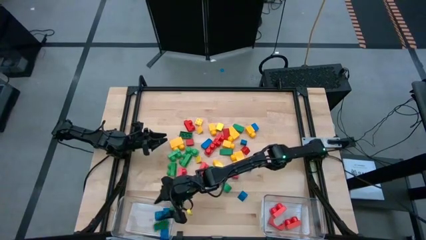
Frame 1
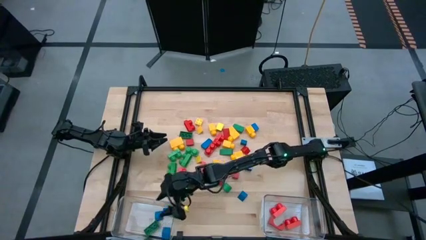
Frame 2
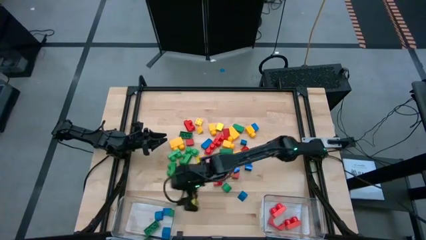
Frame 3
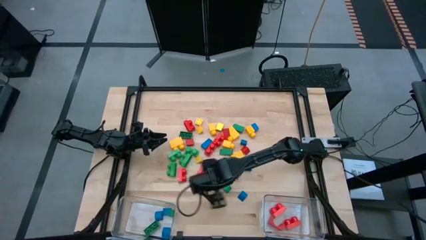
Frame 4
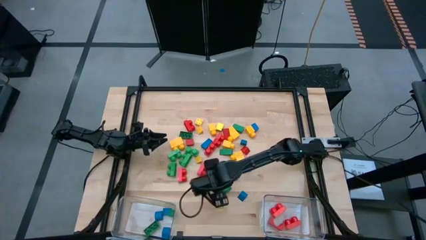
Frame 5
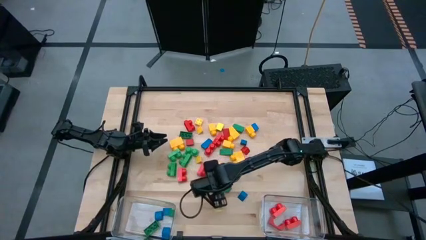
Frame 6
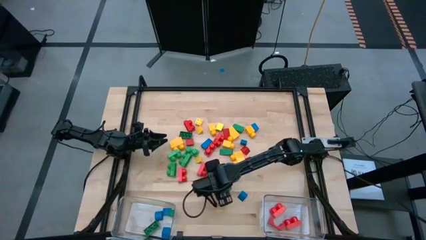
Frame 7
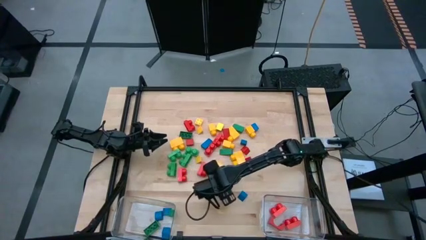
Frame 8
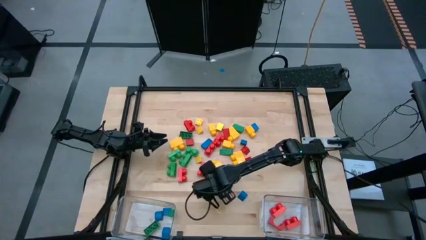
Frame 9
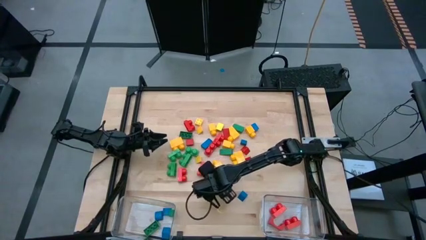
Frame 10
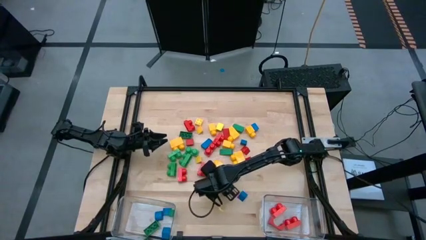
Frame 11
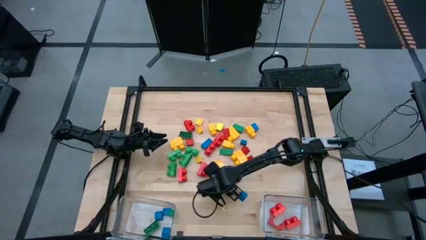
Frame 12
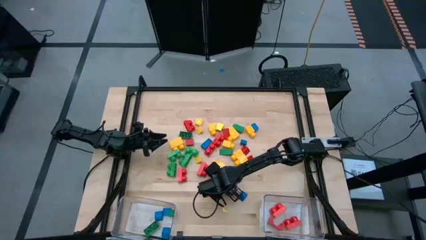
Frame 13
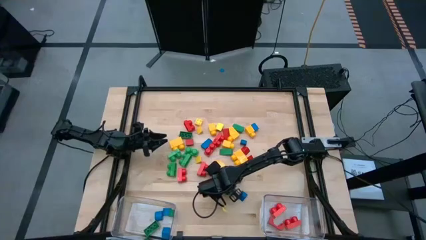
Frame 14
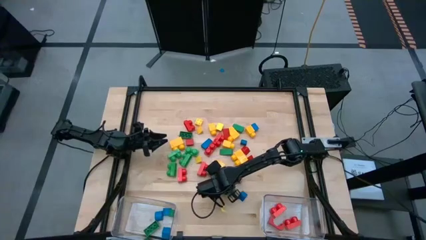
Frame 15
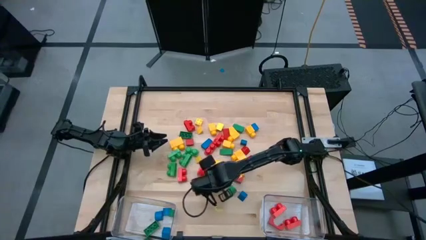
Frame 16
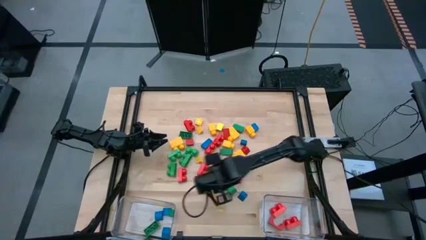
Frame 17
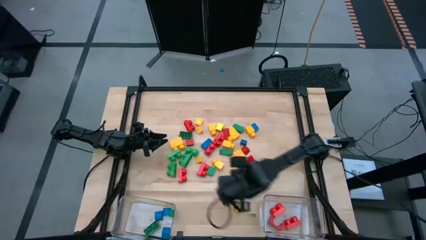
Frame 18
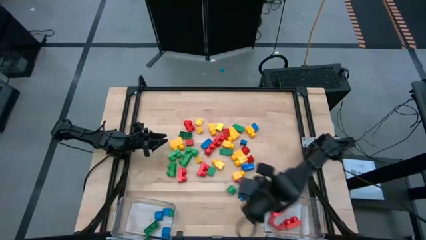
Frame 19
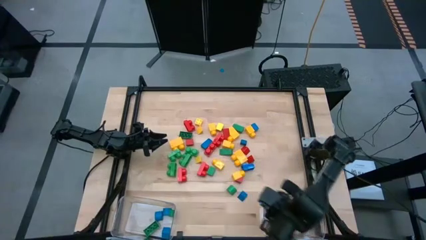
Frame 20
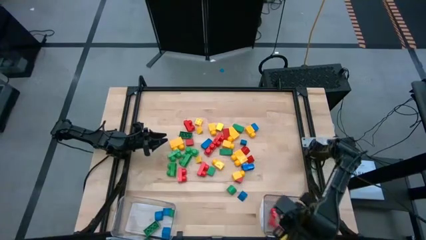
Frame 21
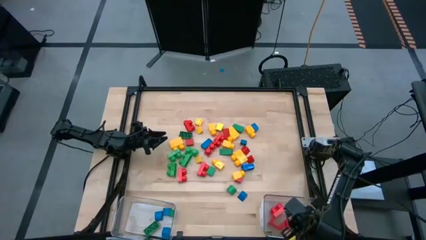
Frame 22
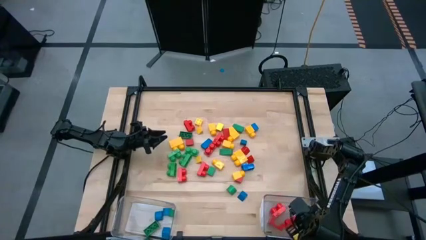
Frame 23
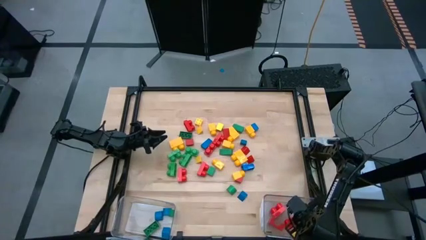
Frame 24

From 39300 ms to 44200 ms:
Task: Sort blocks by size
Put the red game piece into the right transparent bin

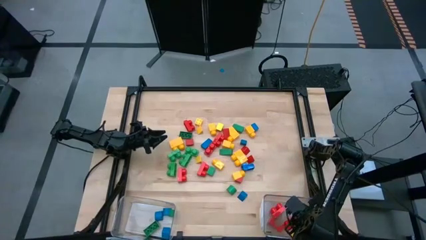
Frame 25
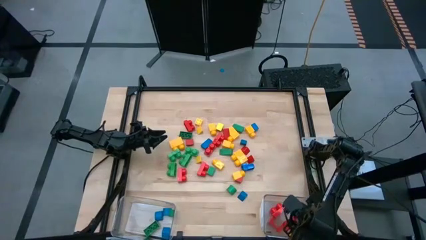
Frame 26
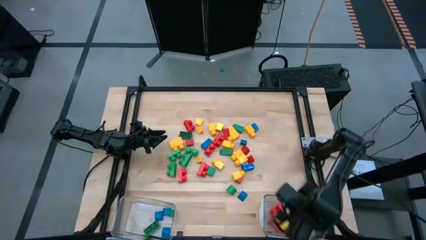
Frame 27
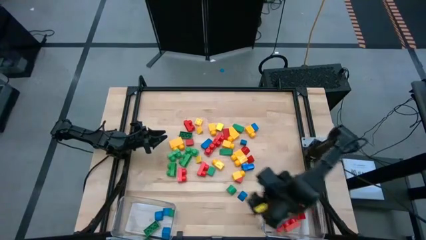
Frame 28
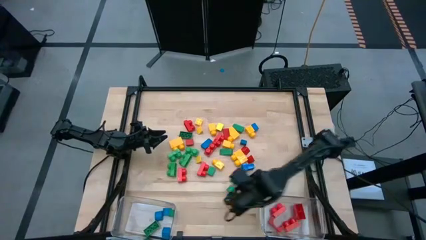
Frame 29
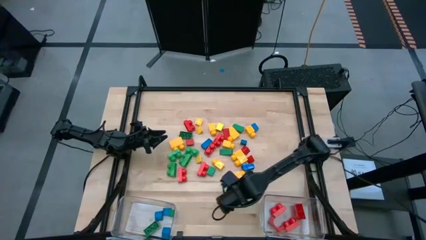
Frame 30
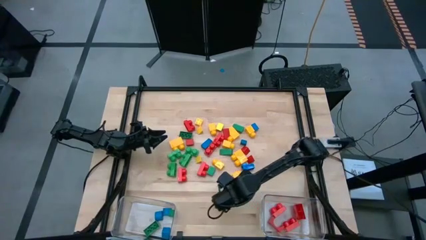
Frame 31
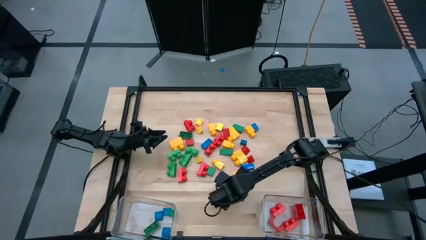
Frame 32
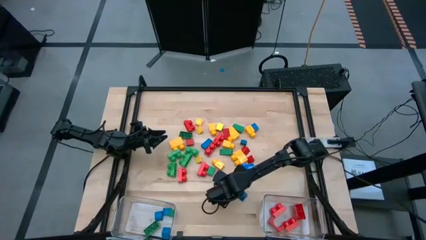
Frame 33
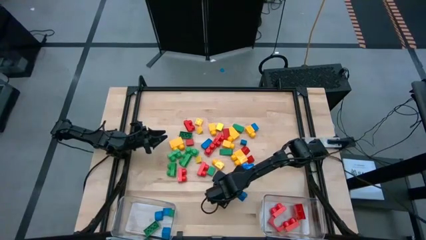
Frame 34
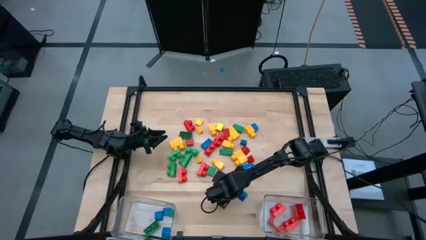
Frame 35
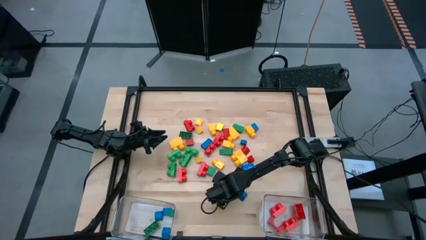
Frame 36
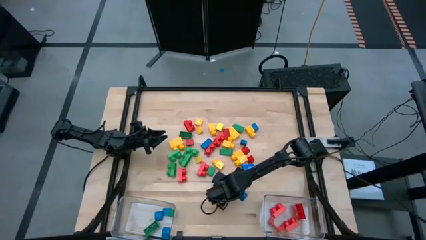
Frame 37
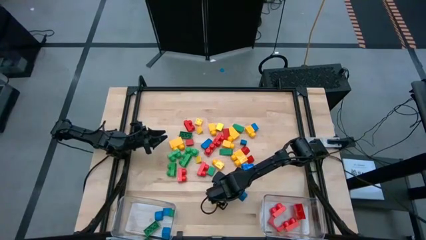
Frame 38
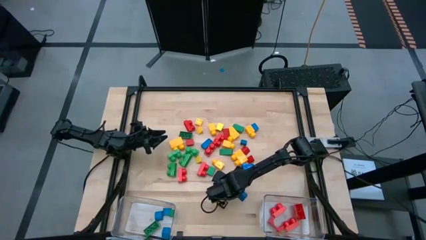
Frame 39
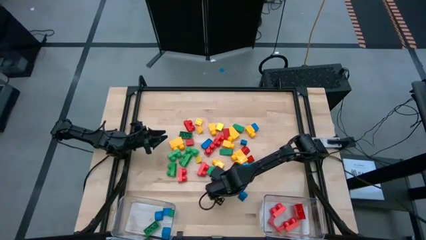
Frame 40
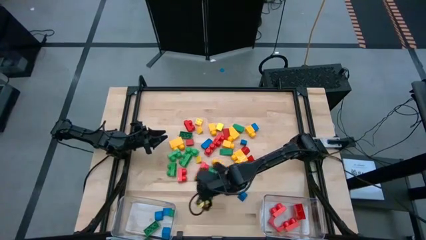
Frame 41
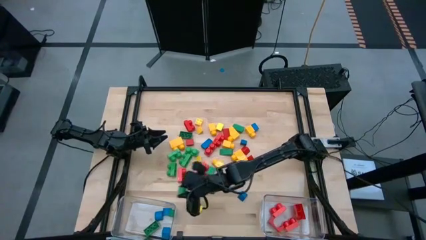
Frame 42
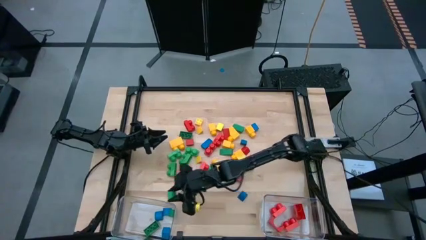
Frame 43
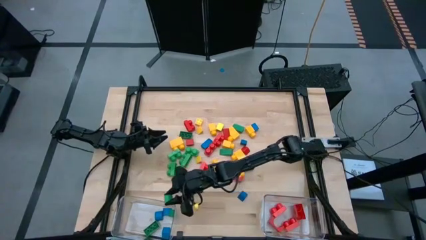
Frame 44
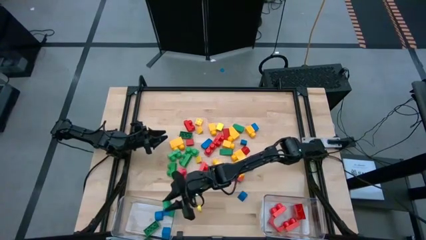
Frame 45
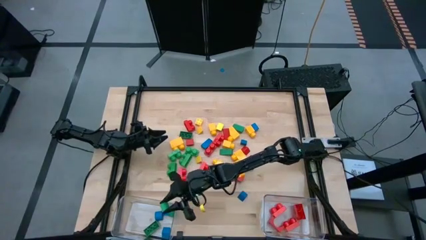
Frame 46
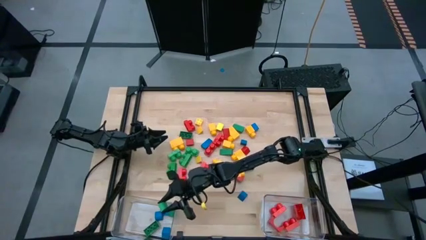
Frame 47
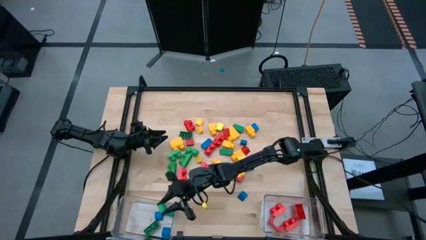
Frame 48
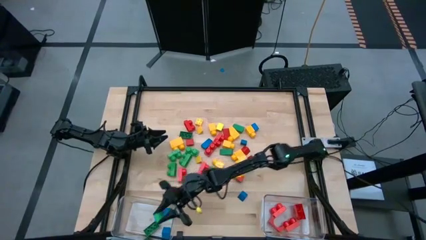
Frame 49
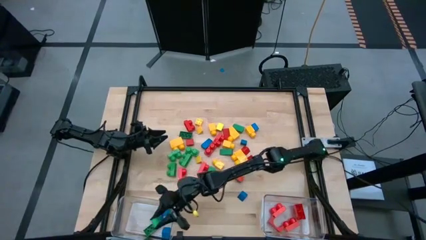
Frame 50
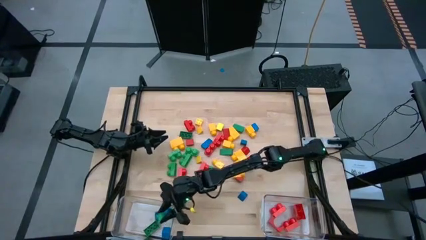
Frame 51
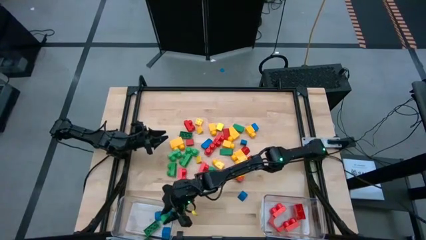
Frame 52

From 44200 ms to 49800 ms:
Put the green half cylindrical block into the left transparent bin

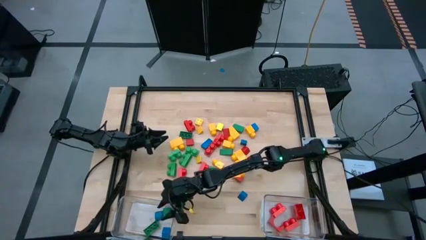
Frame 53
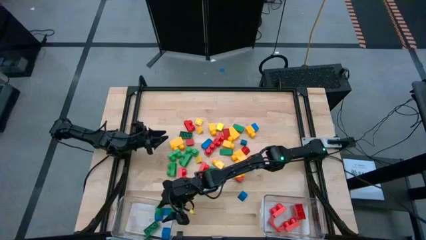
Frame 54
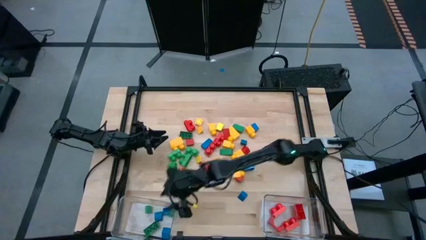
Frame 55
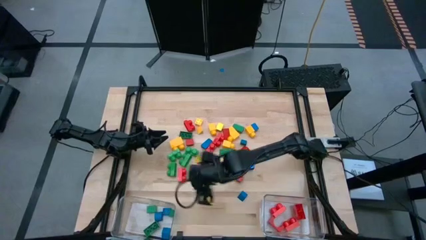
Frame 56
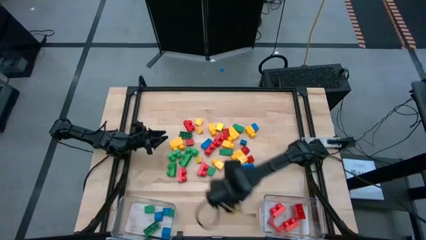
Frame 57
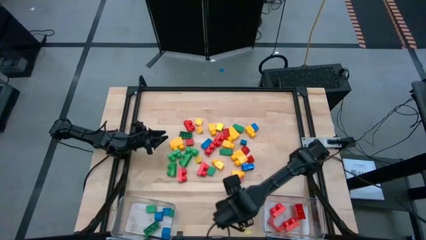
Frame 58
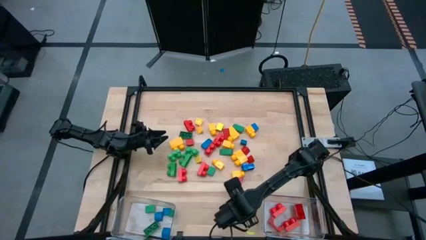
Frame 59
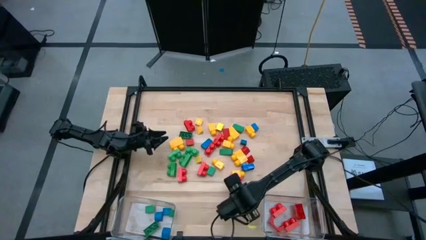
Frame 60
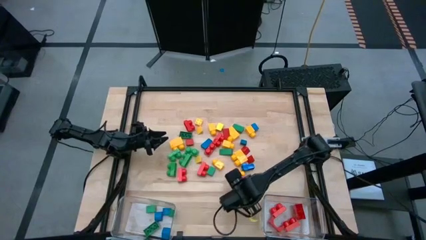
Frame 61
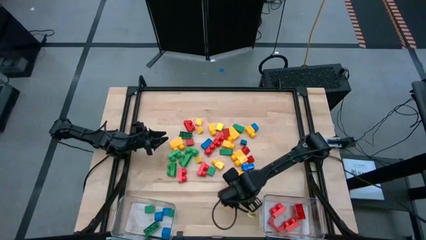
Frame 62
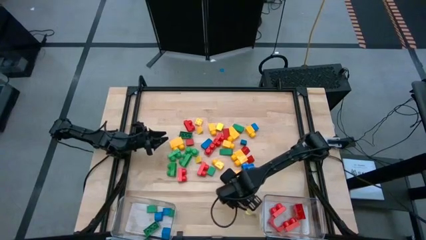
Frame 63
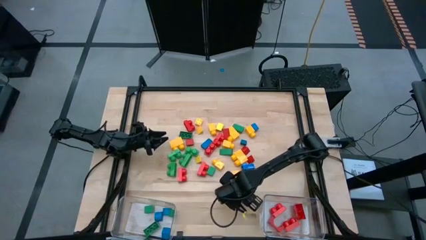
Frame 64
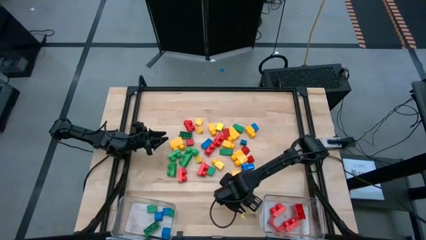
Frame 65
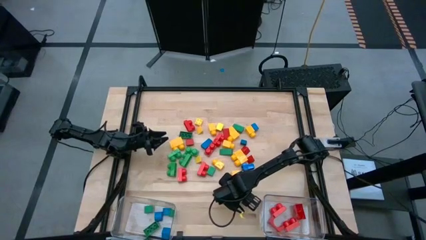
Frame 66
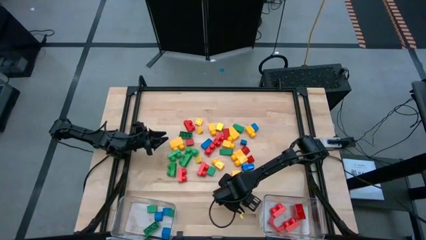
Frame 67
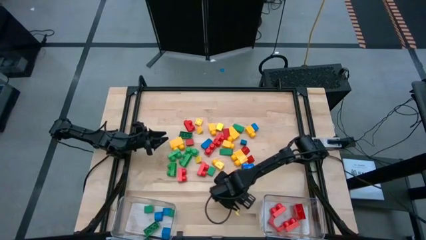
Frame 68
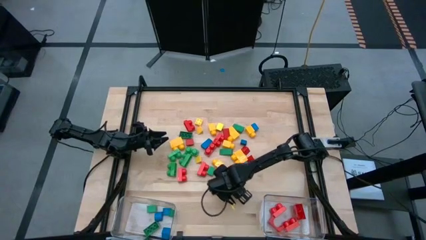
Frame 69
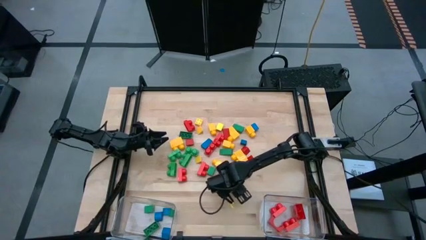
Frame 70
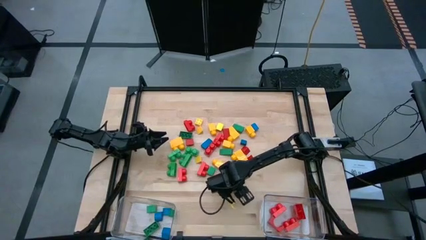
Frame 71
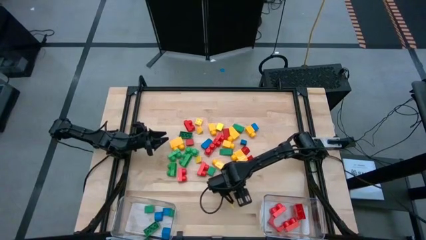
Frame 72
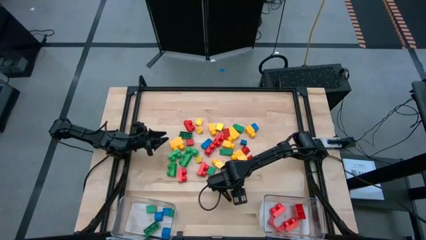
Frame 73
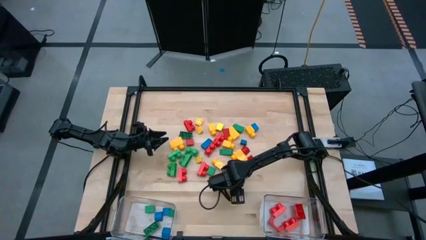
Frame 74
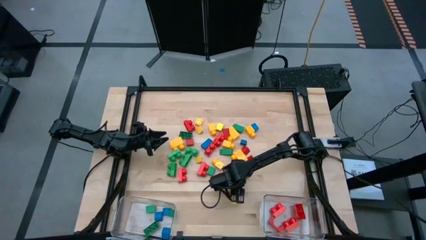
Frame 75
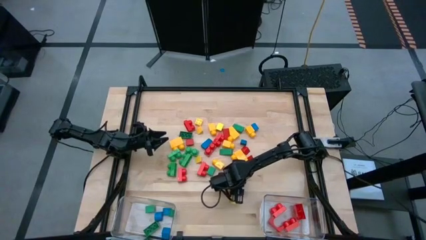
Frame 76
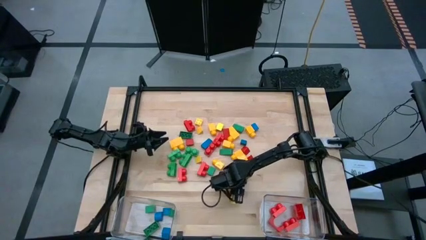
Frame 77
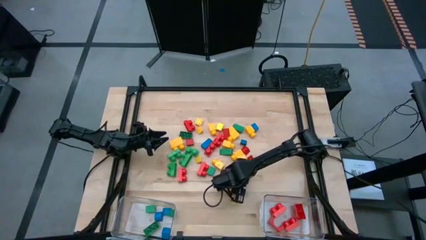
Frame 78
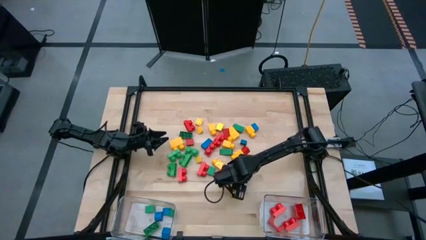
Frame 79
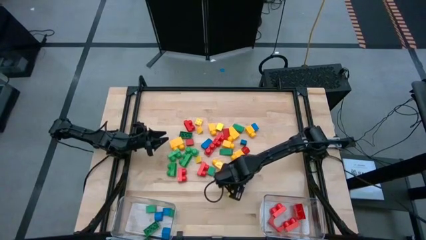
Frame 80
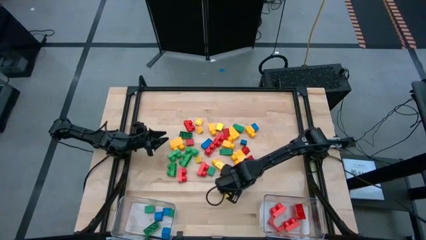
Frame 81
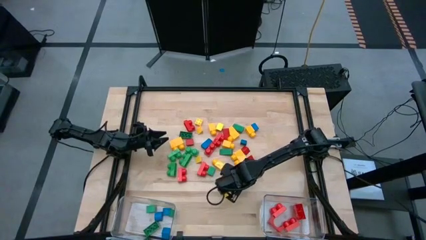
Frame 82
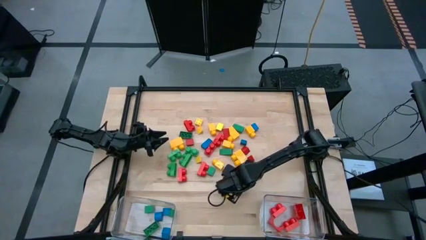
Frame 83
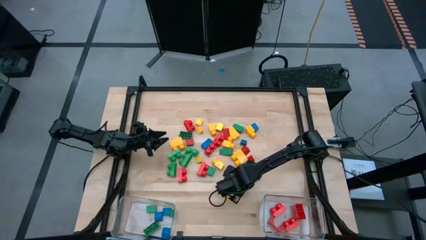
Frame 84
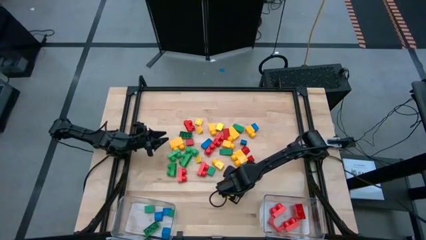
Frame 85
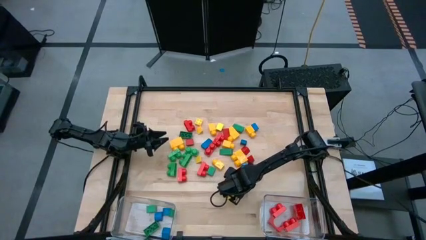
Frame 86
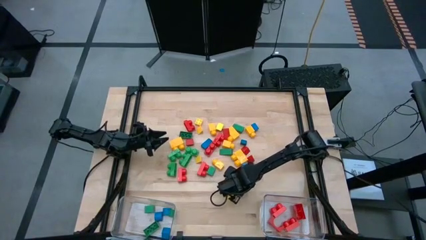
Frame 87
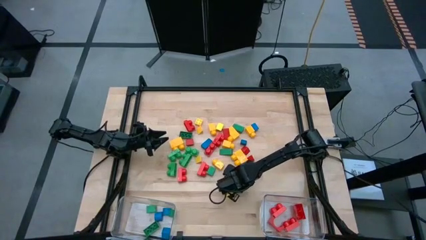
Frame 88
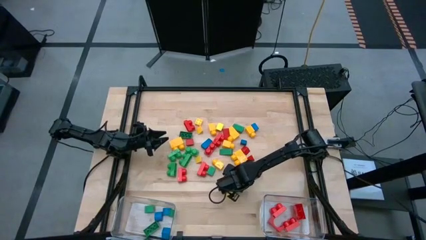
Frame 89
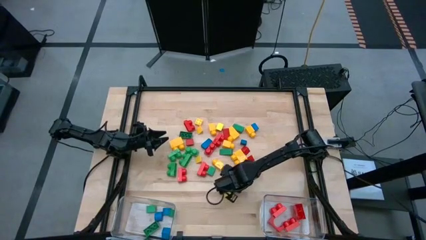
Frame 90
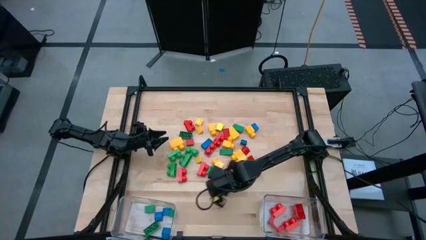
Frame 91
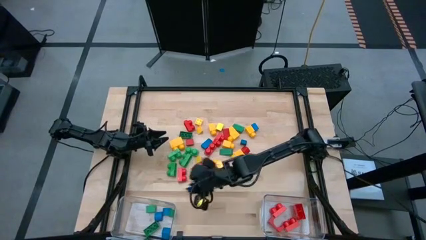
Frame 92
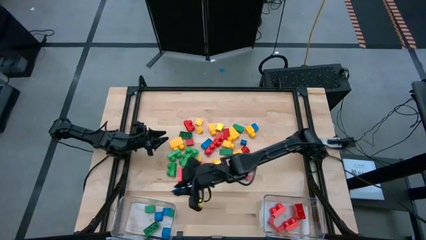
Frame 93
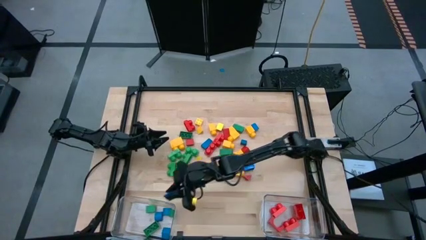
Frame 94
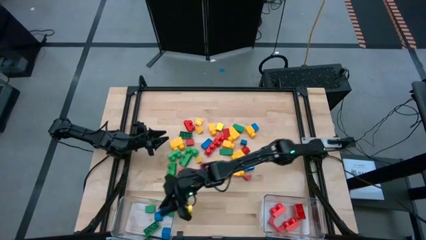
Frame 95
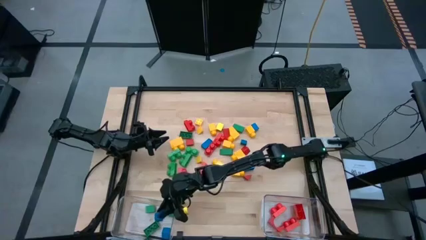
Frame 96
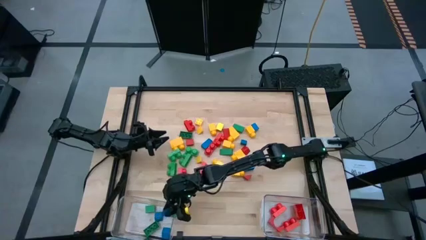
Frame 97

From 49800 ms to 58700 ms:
Put the blue triangular block into the left transparent bin
